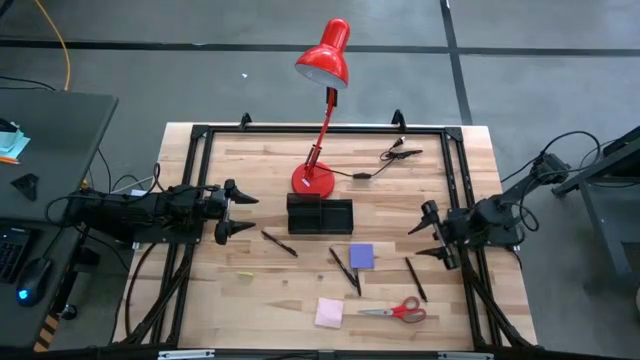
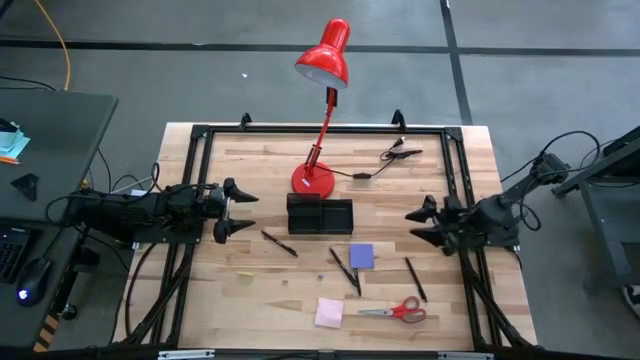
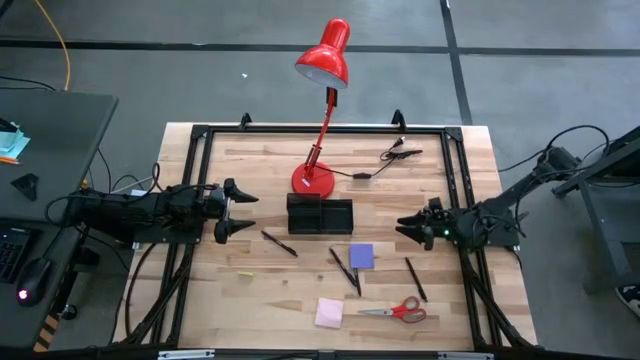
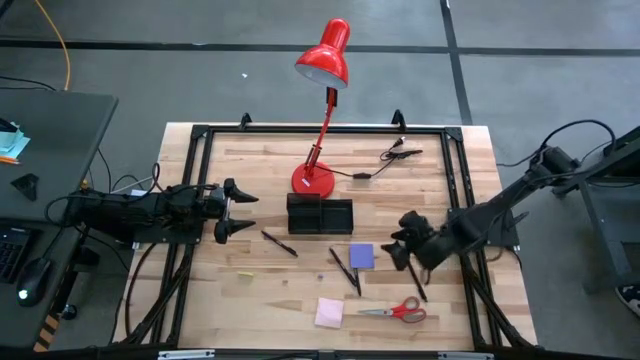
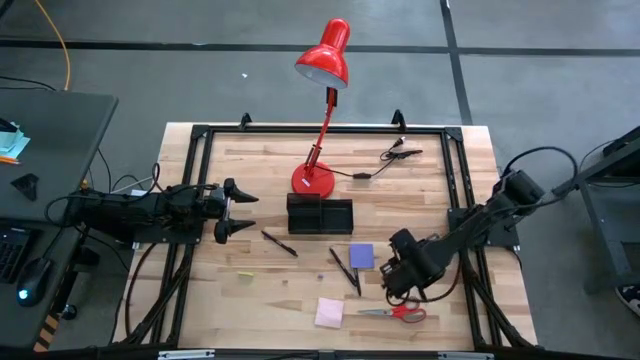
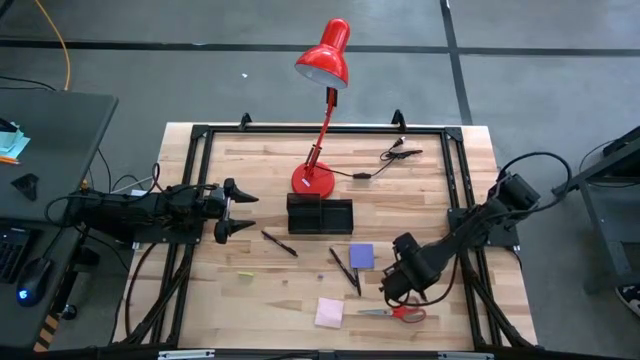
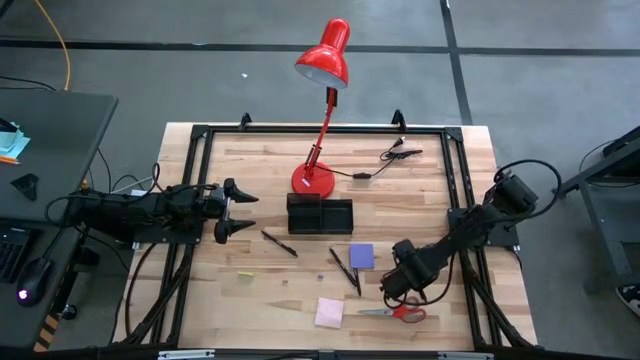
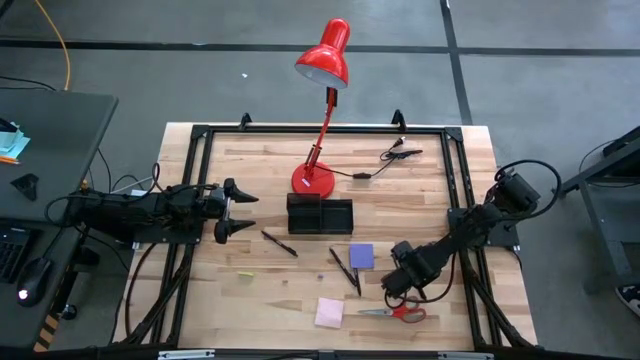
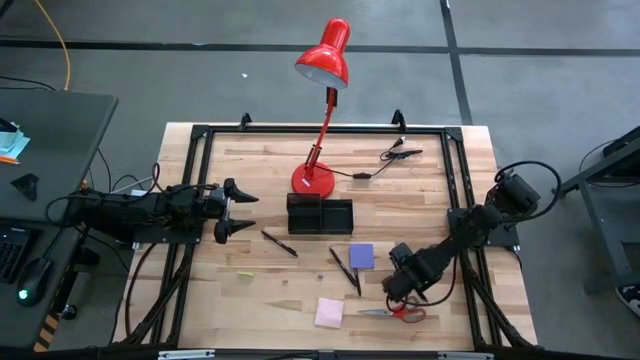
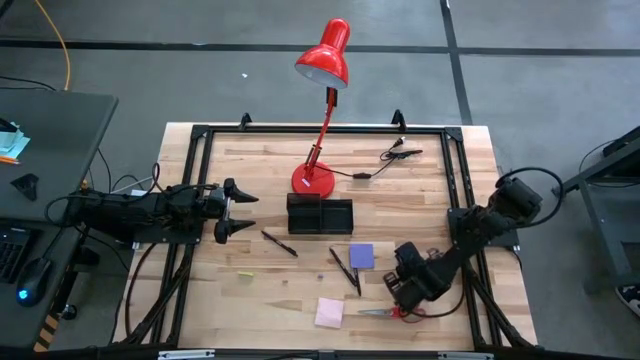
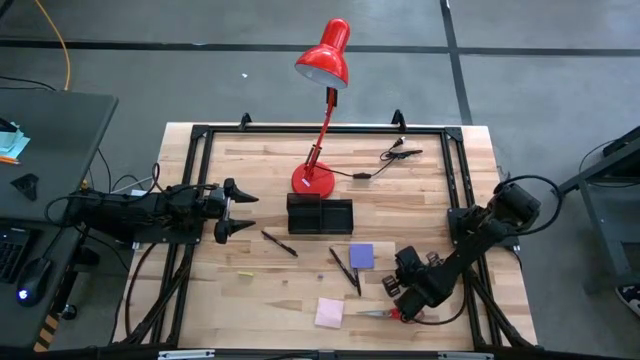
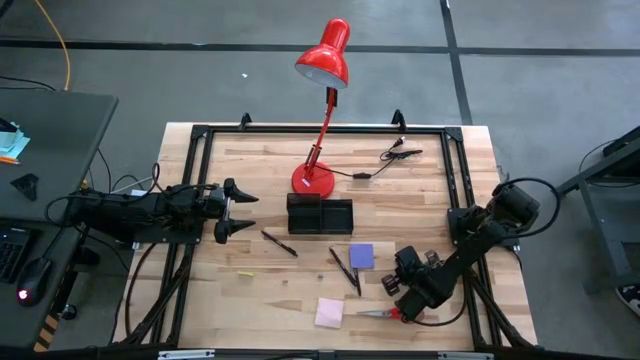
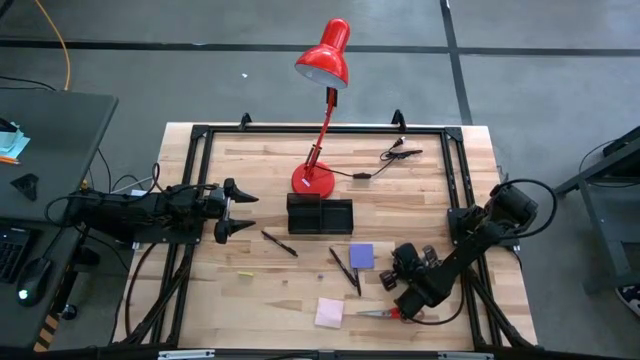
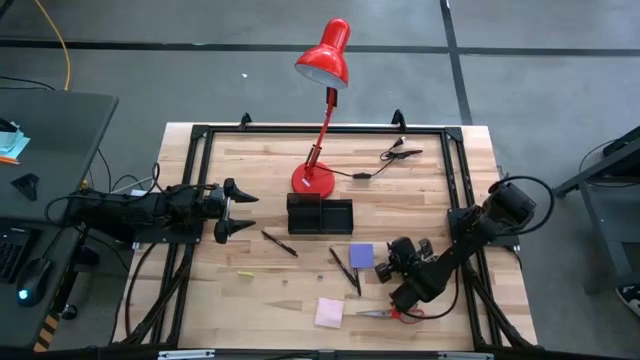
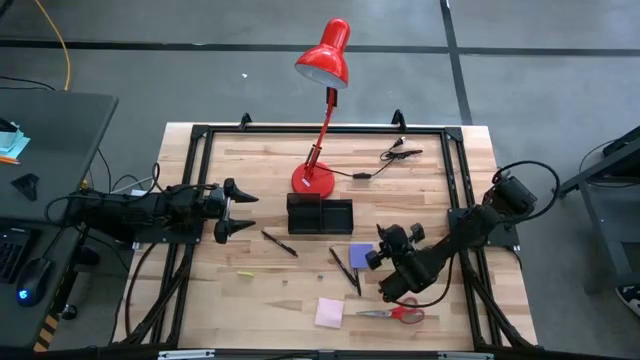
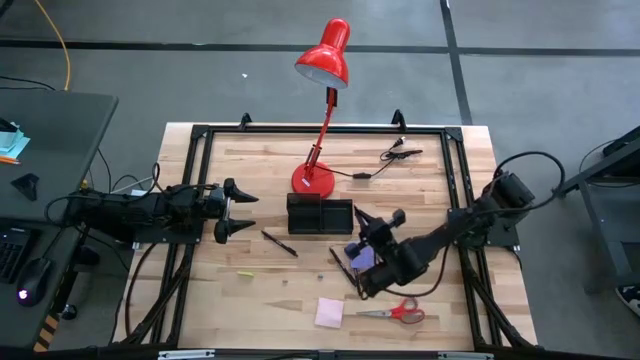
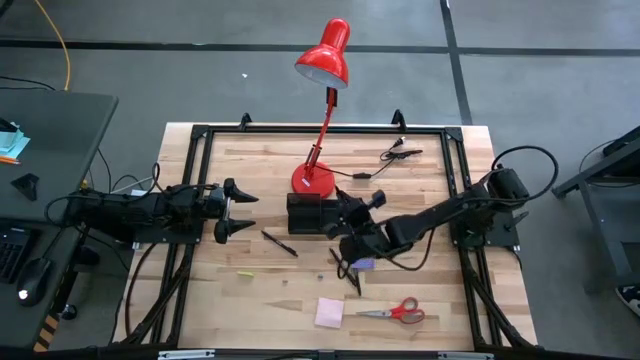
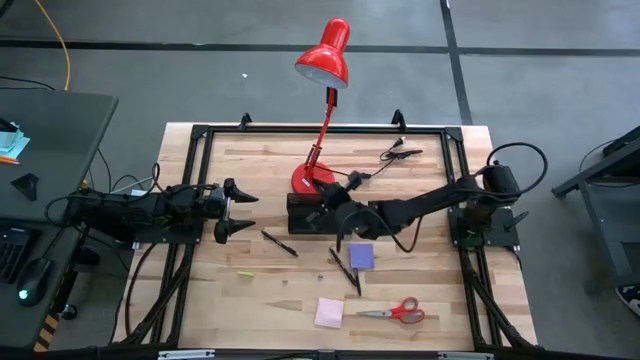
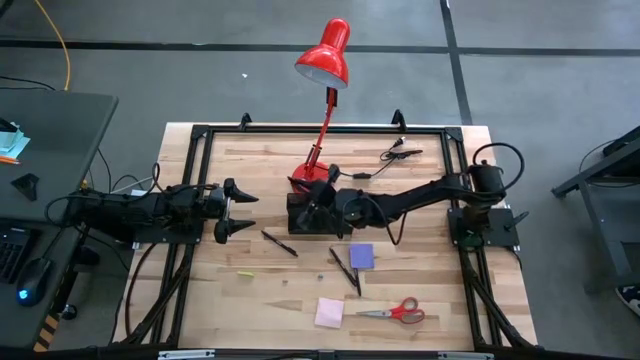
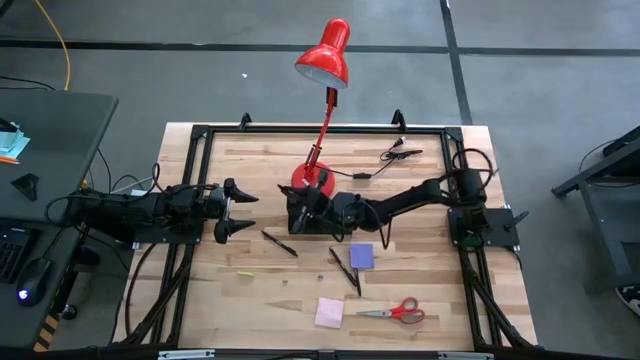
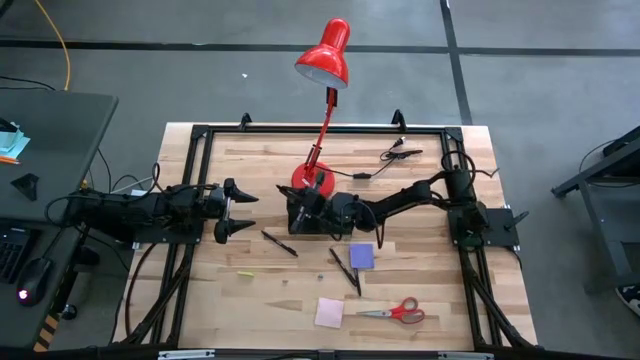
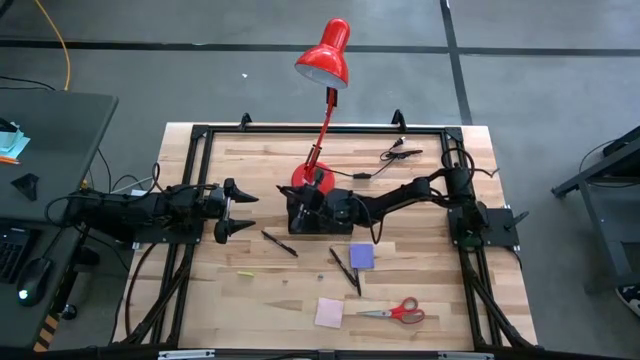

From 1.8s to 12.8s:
Task: Pick and place office supplies into organizer
Put the black pen into the black desk organizer

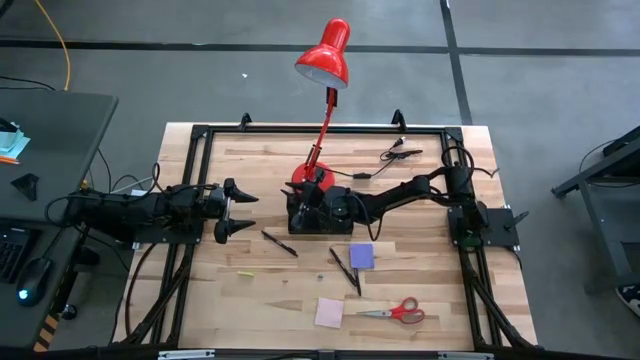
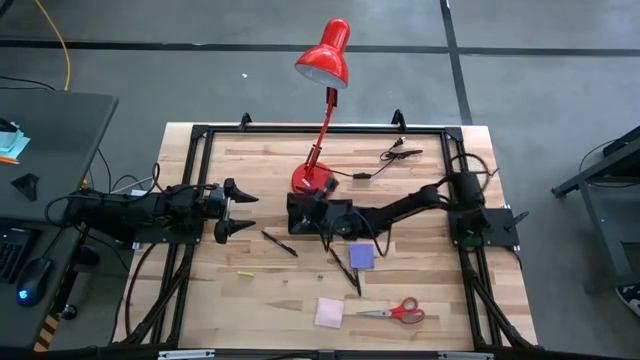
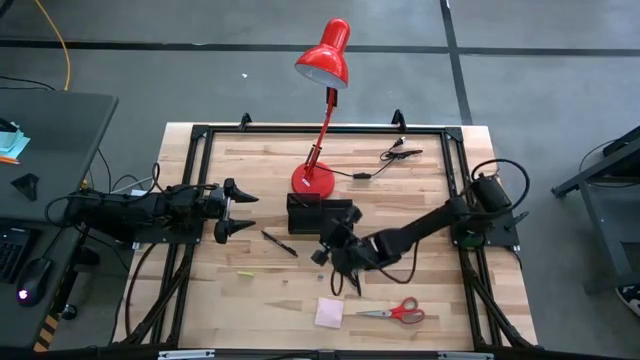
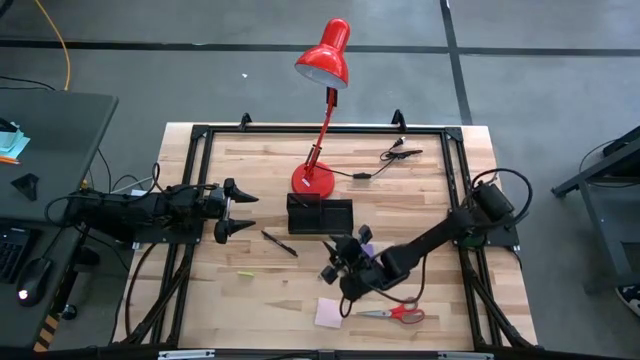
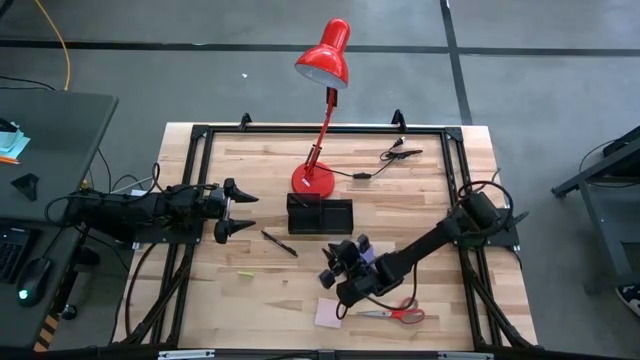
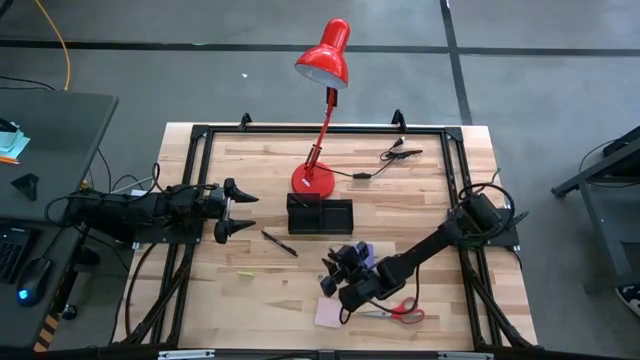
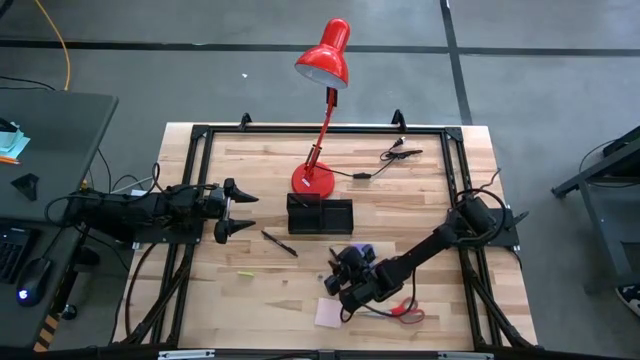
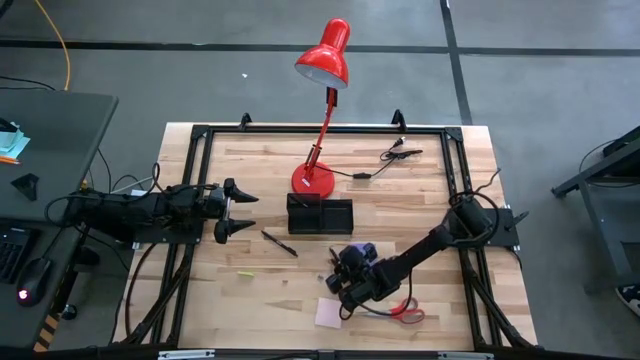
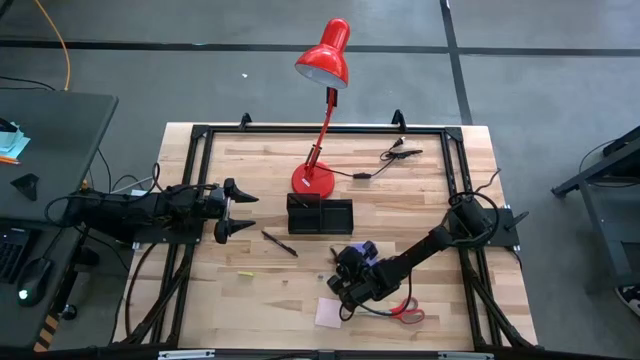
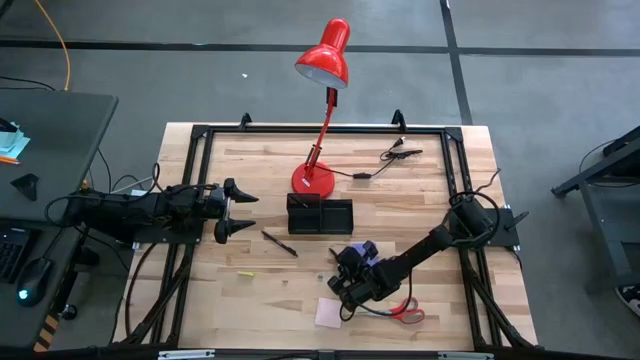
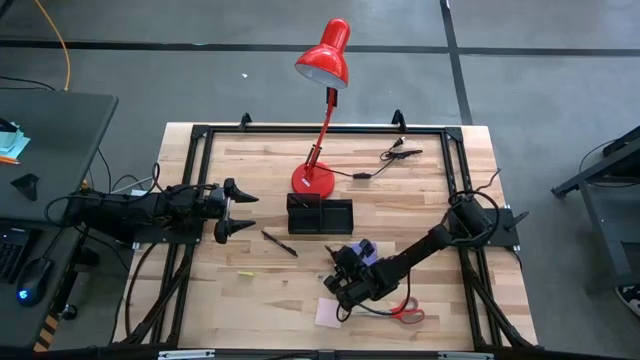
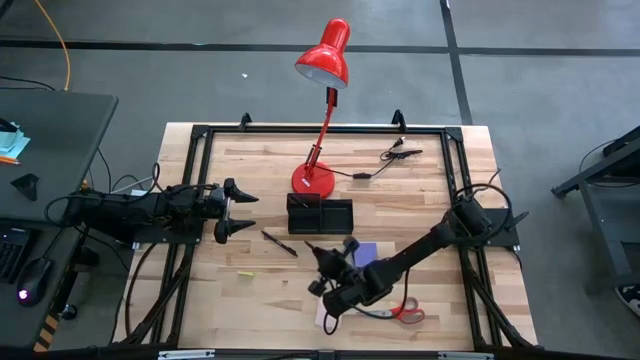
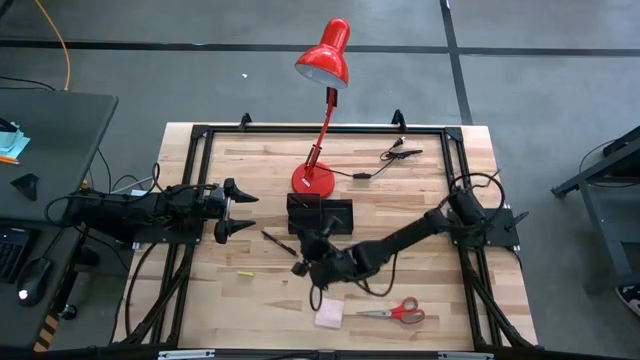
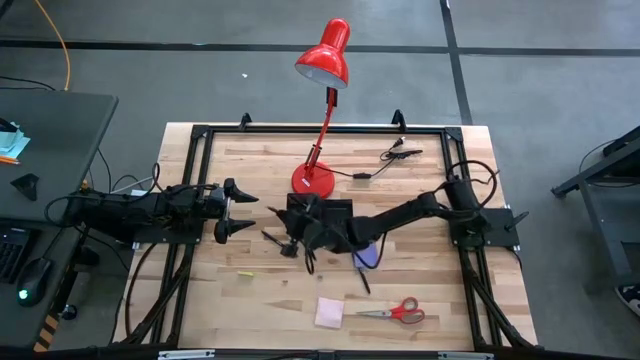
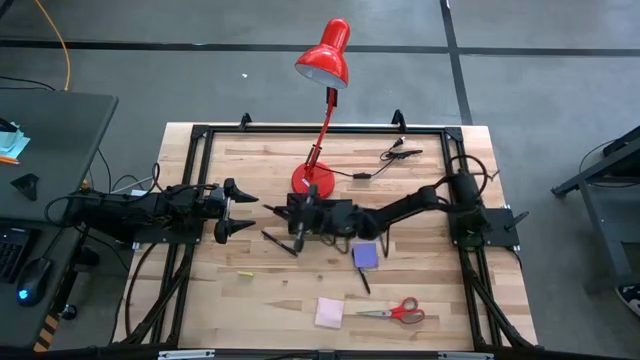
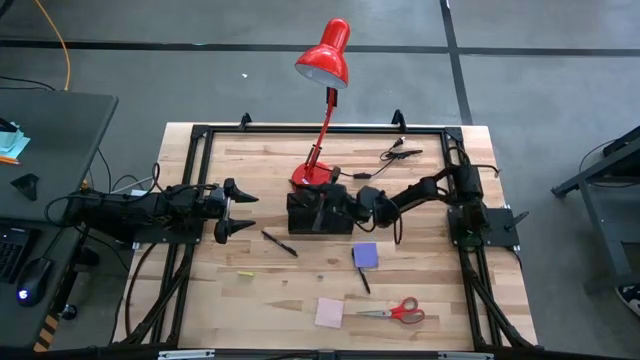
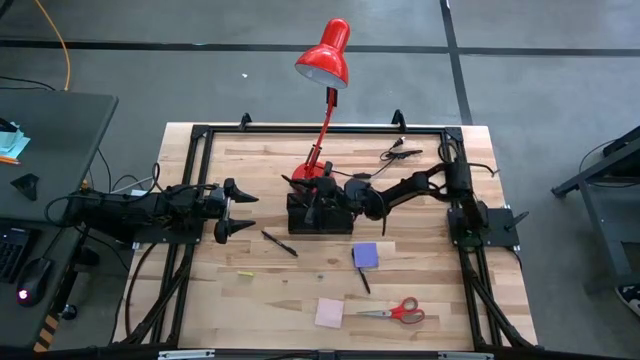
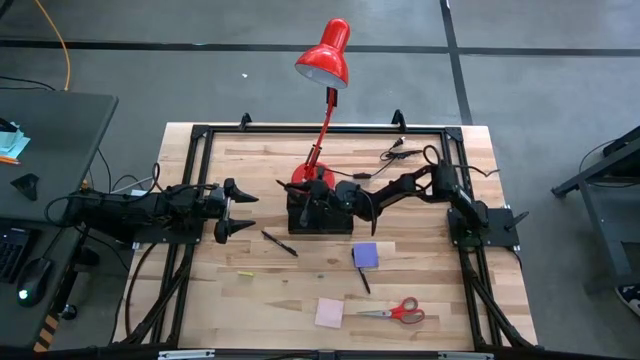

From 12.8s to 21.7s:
Put the black pen into the black desk organizer
